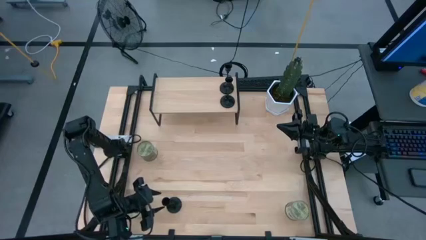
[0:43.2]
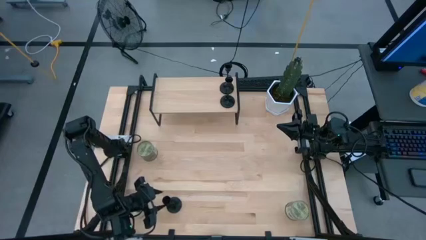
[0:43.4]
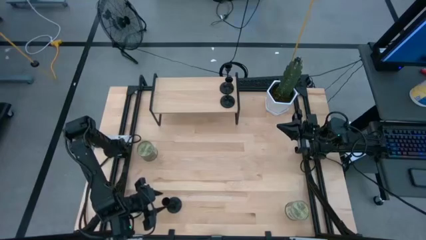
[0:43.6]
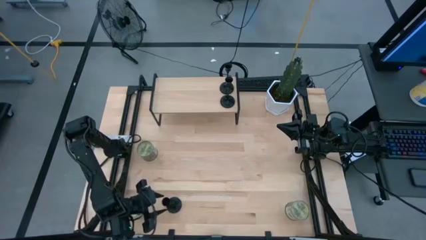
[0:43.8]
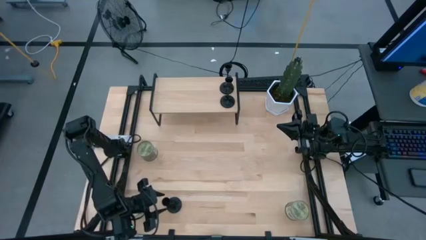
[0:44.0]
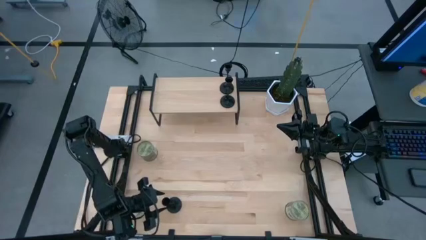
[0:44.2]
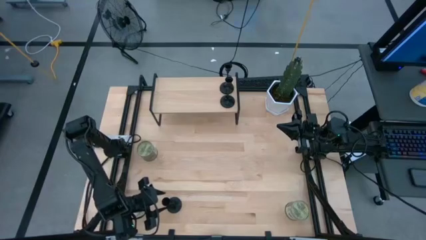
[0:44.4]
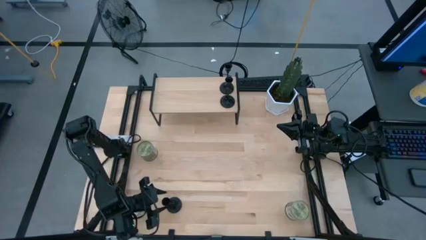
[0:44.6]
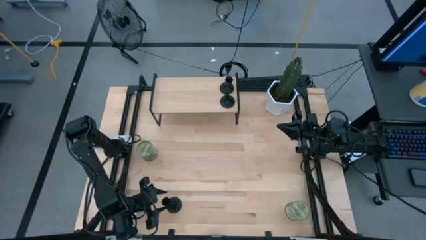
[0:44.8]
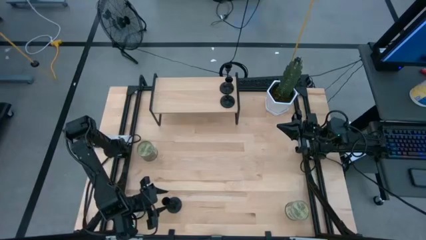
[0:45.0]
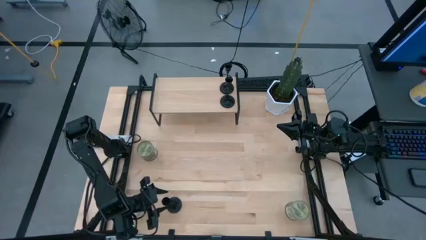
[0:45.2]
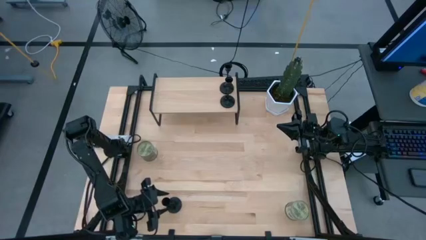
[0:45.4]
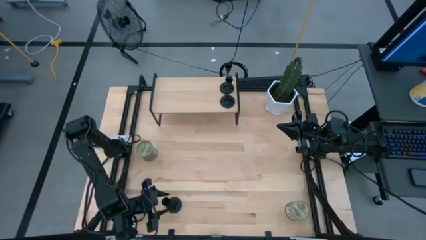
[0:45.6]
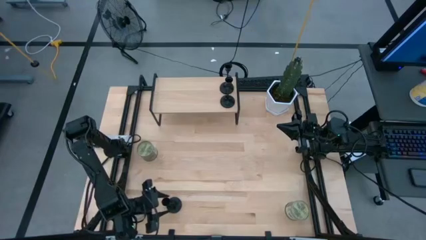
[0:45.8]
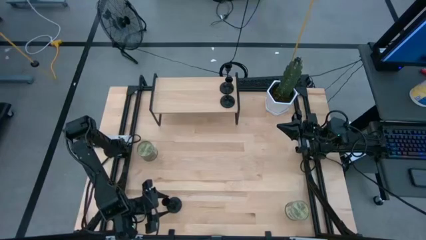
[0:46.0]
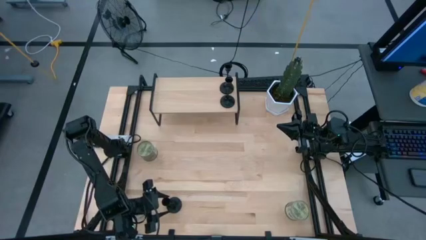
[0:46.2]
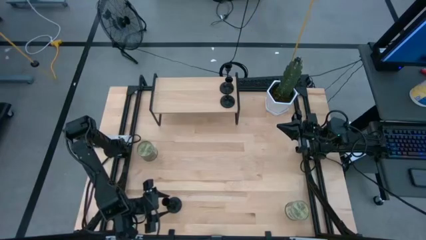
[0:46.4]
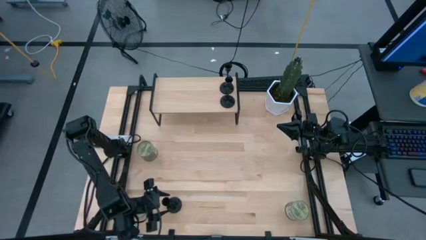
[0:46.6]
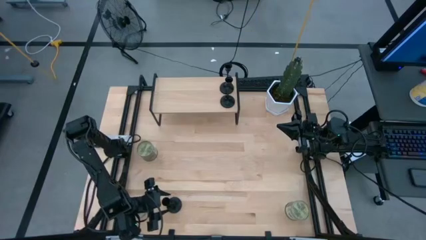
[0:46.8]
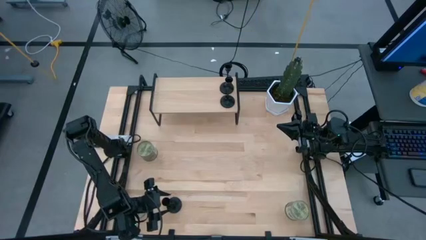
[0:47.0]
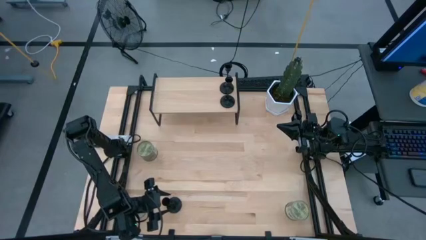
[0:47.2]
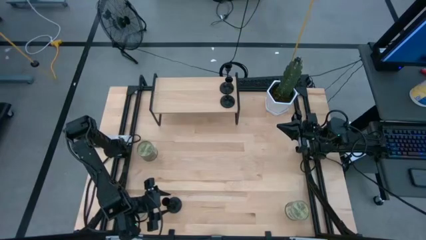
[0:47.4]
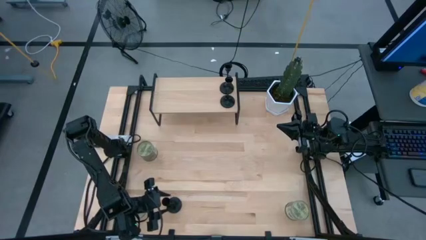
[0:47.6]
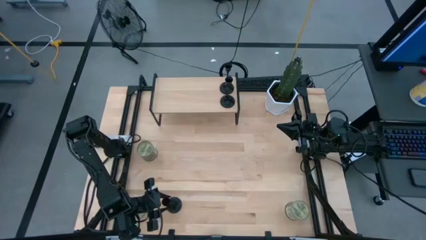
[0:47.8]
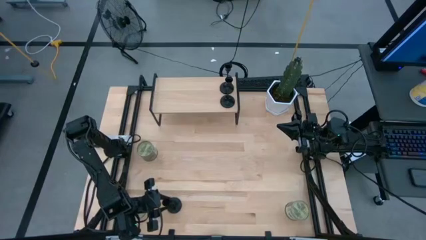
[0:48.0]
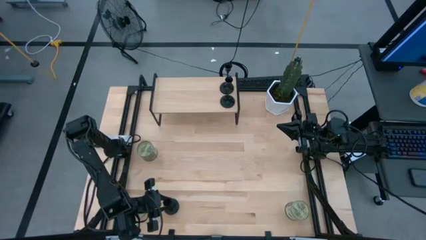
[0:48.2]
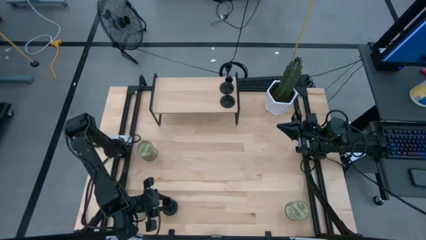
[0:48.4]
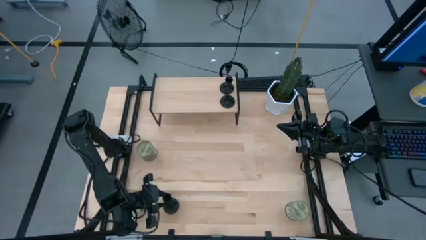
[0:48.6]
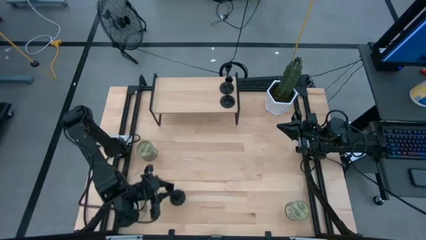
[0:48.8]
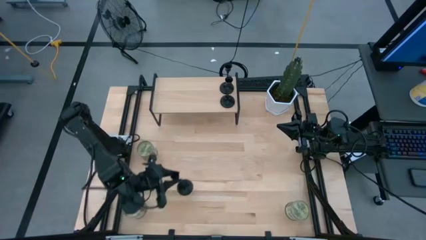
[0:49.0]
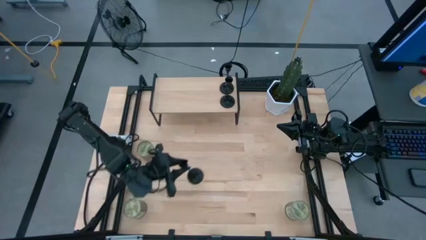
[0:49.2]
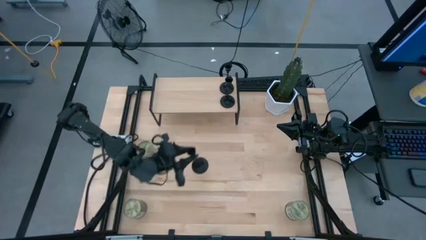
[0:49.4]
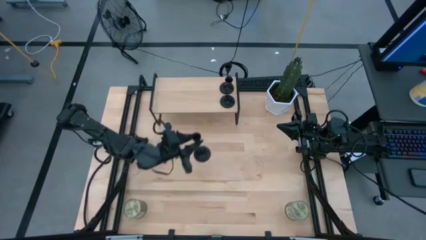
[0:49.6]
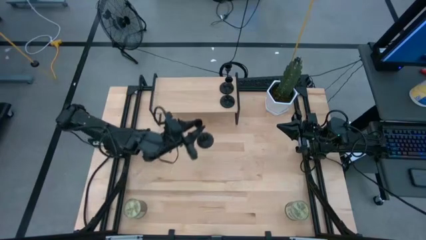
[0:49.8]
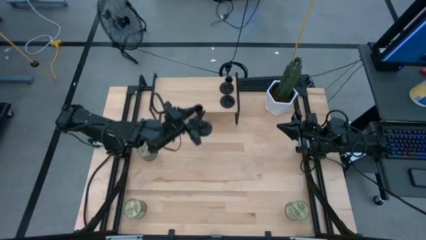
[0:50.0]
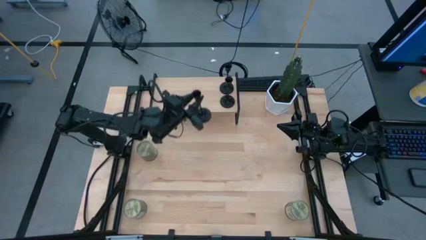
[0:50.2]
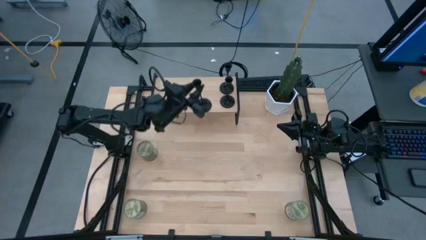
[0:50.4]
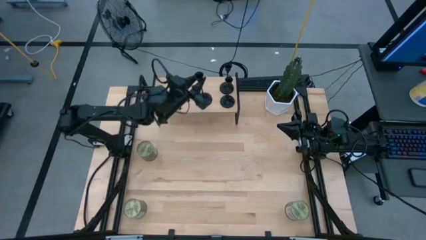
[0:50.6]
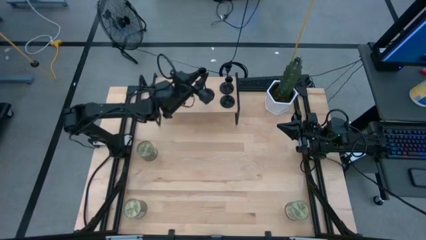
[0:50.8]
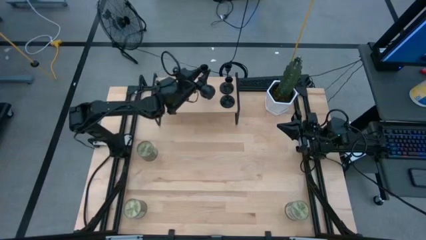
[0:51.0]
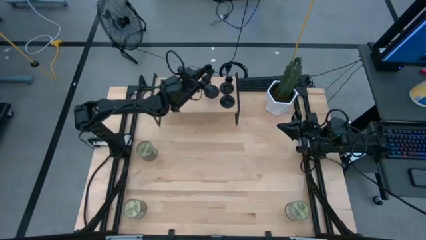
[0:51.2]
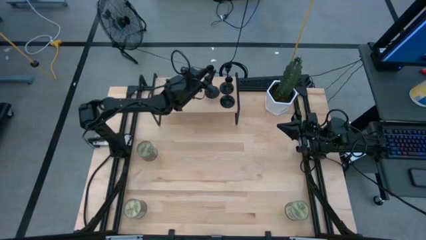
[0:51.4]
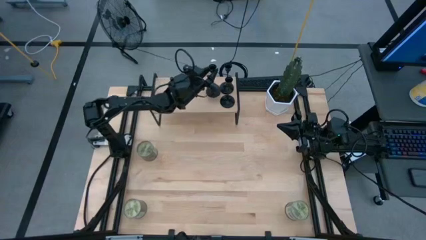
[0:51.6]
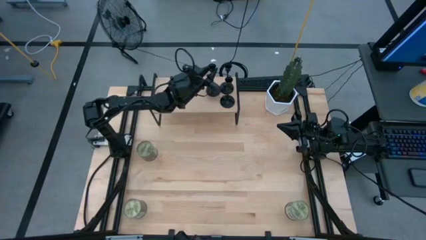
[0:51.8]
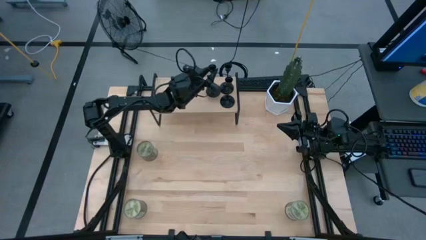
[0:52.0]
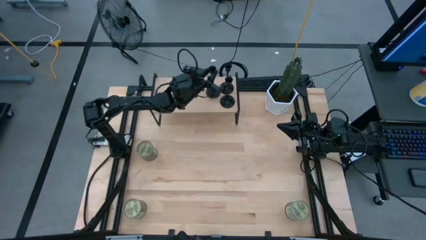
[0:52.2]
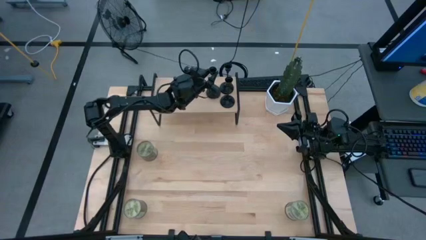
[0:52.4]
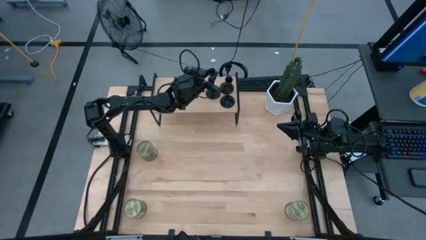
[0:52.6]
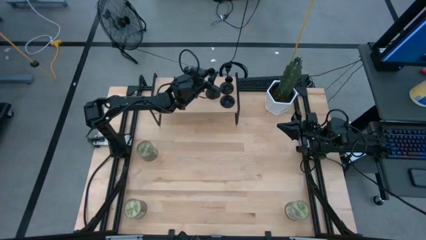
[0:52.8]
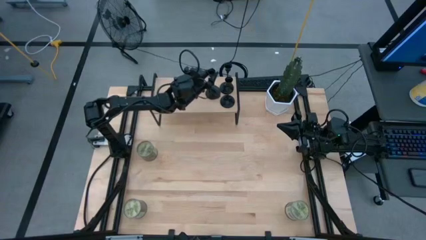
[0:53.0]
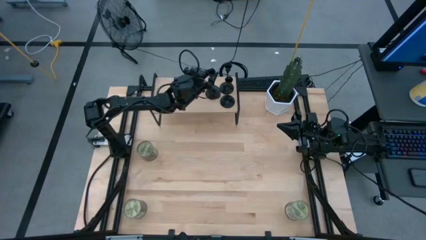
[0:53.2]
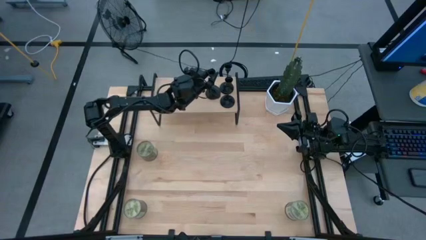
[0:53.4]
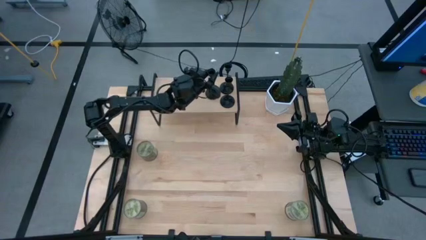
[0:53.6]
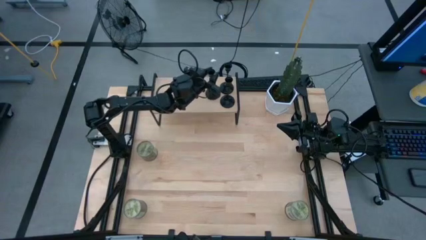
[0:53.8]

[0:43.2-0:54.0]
Task: Pick & Place candle stick holders
Put the black candle holder on the shelf

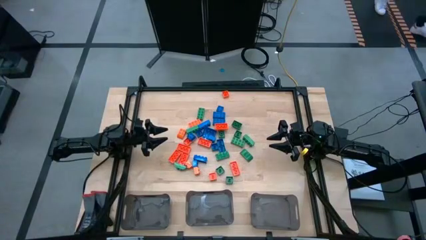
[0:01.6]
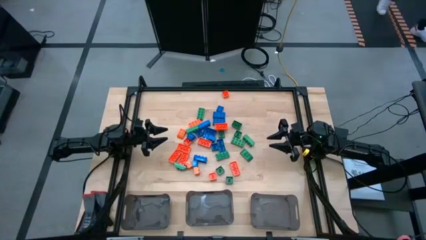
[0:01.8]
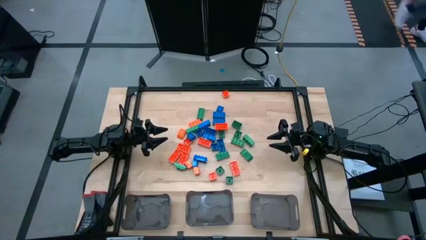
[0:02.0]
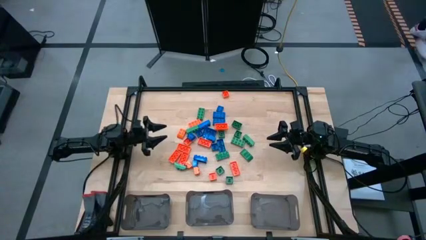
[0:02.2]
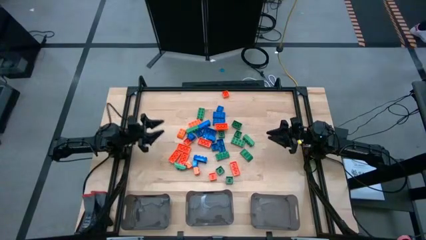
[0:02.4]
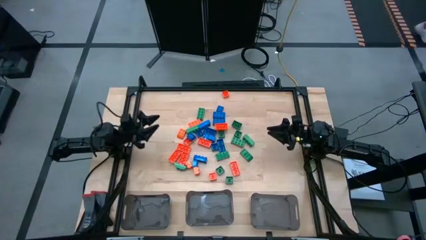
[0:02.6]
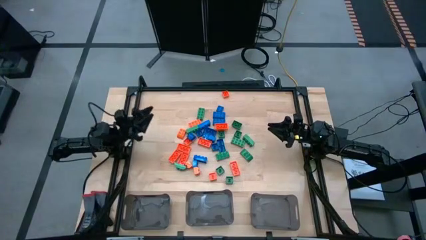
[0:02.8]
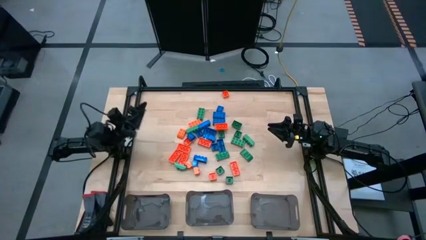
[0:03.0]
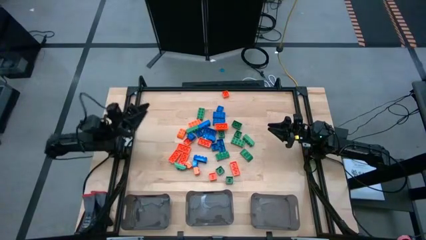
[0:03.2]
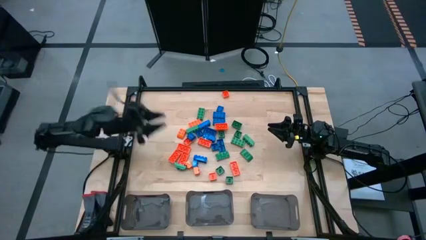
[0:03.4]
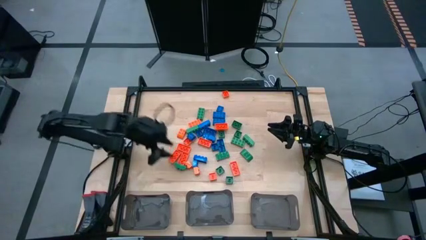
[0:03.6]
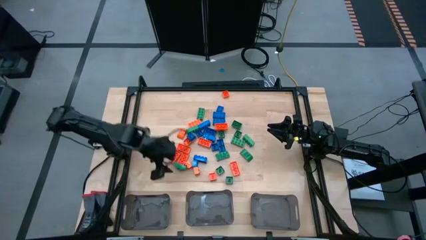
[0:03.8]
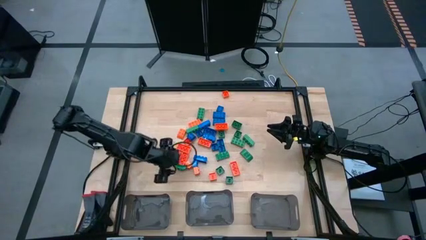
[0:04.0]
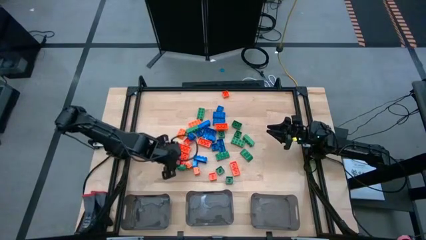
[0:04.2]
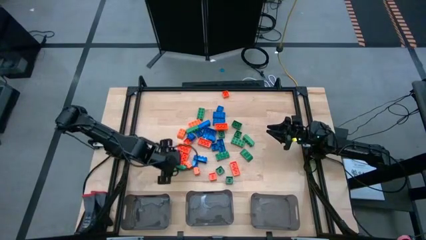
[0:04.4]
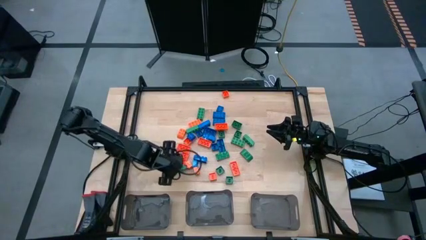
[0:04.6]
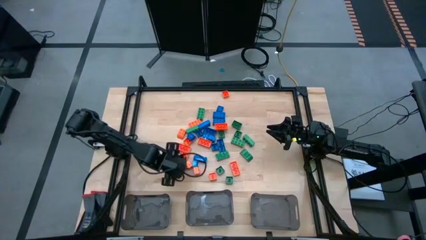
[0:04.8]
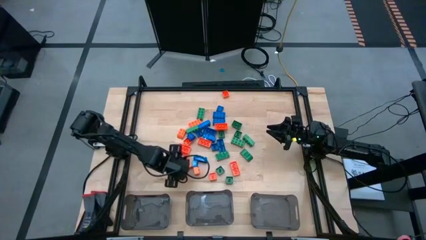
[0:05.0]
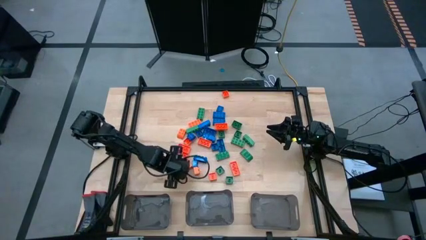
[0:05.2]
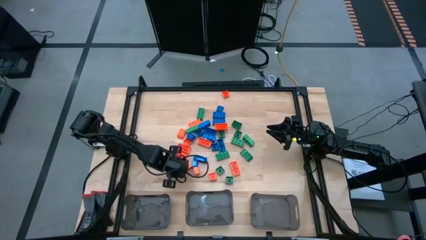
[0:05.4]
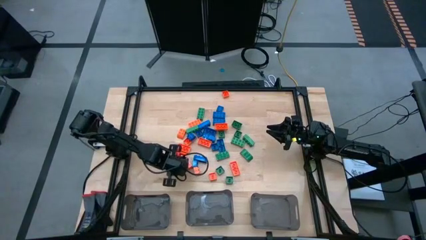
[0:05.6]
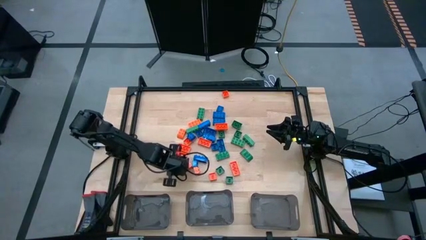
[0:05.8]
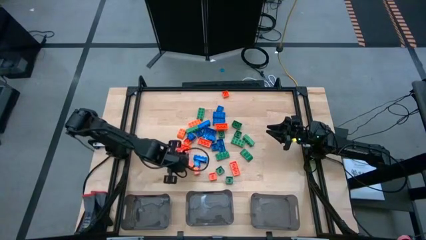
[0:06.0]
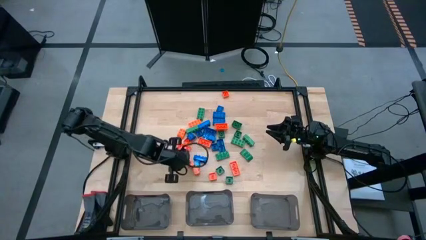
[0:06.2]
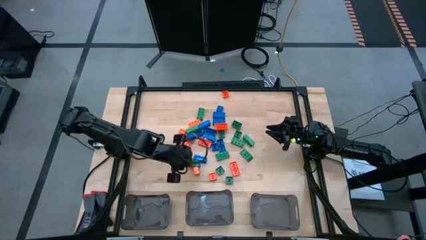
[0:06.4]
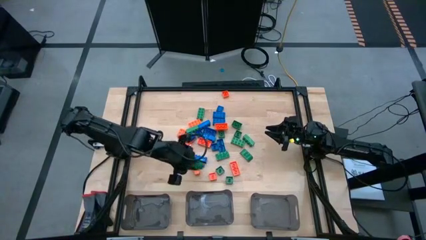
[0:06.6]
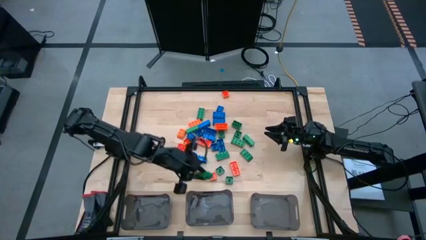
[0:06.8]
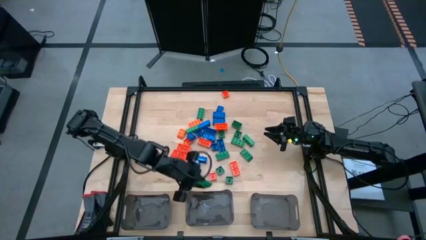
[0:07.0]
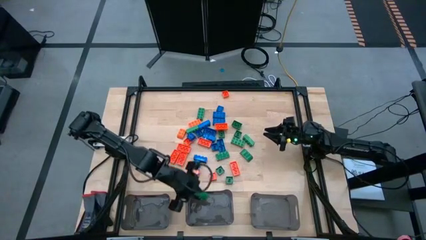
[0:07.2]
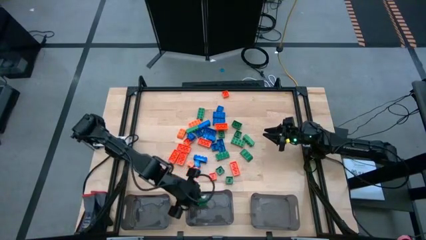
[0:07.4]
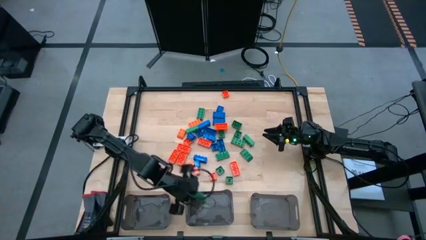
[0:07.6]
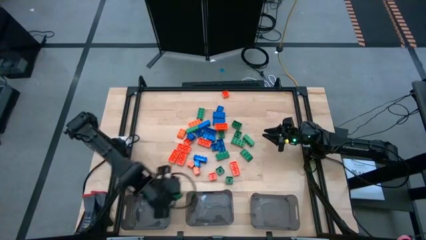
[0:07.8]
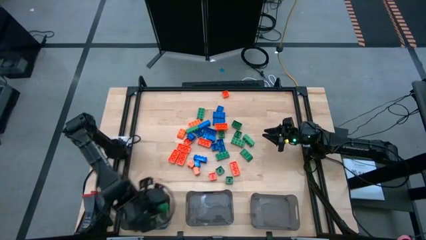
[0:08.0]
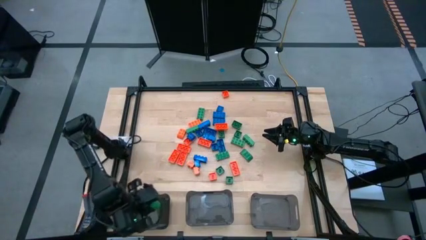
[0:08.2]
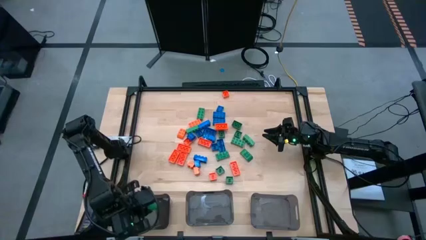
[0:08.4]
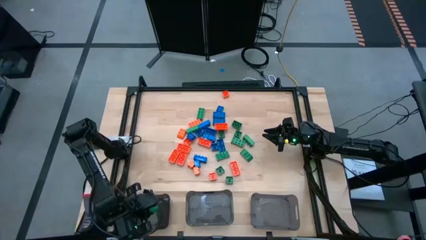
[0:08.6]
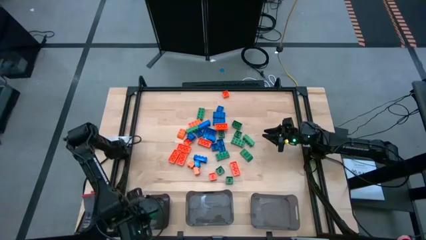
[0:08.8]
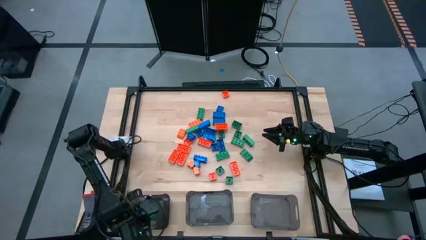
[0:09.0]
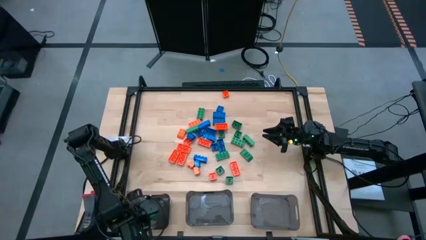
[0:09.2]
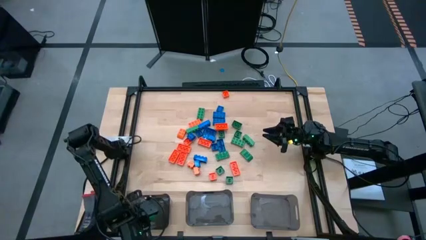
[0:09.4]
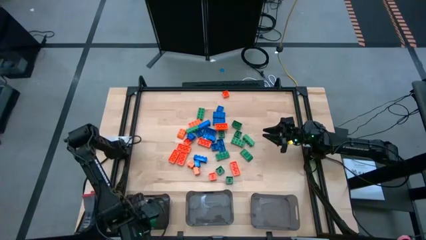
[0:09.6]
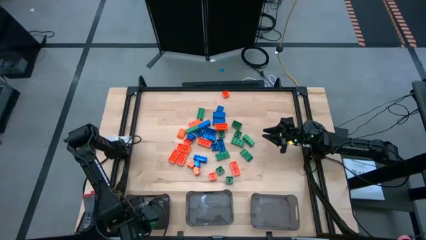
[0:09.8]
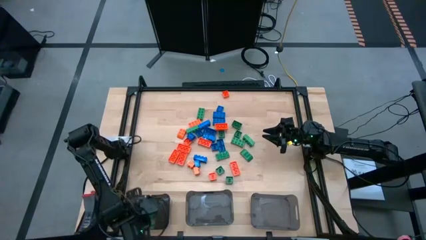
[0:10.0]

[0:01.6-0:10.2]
Task: Sort blocks
Put the green game piece into the left black bin
